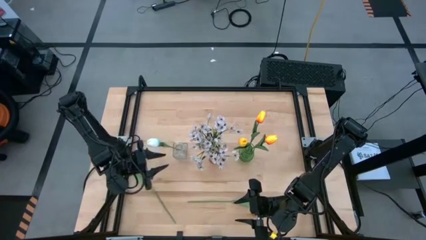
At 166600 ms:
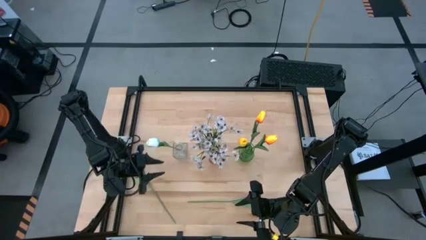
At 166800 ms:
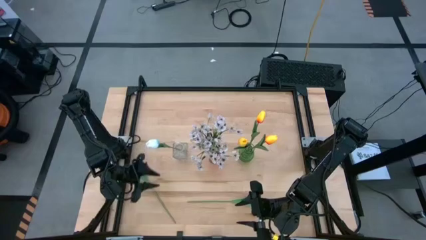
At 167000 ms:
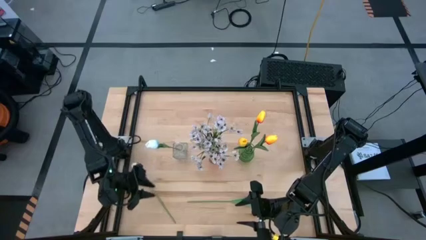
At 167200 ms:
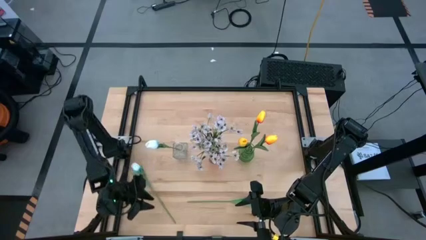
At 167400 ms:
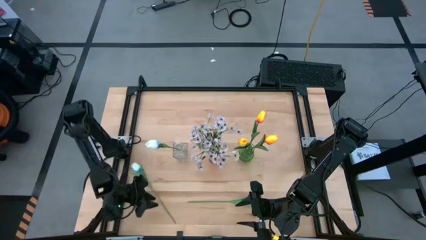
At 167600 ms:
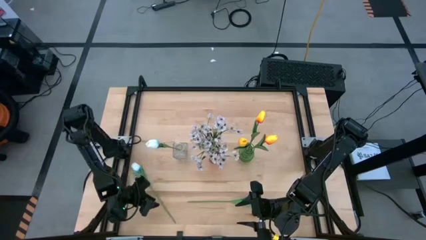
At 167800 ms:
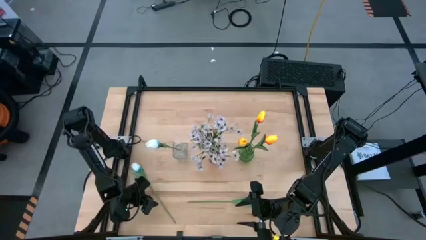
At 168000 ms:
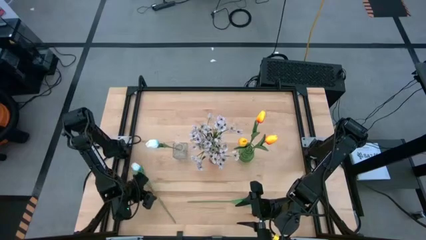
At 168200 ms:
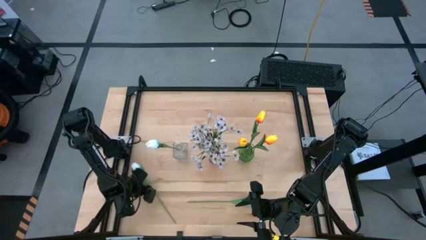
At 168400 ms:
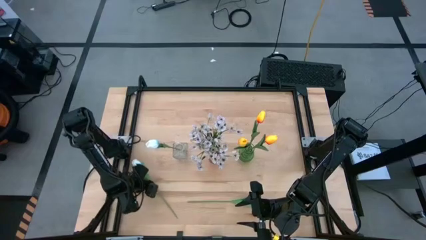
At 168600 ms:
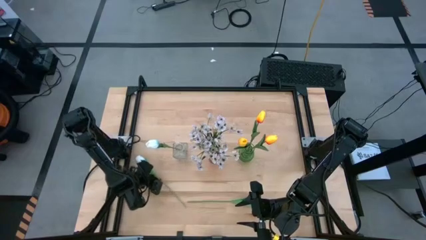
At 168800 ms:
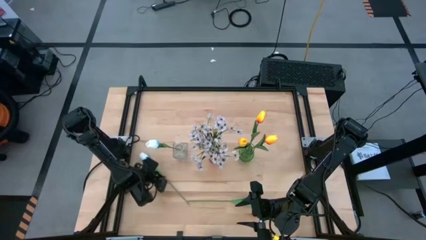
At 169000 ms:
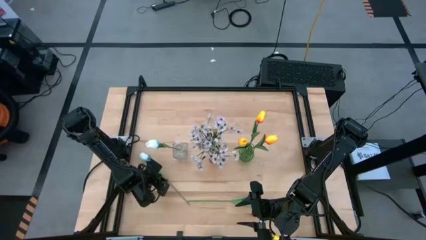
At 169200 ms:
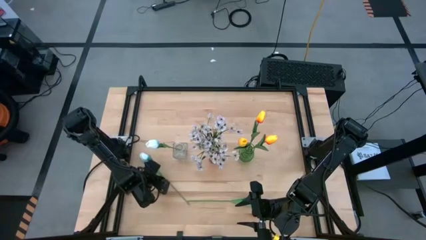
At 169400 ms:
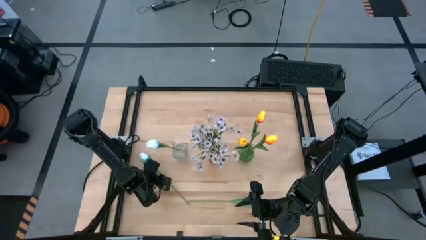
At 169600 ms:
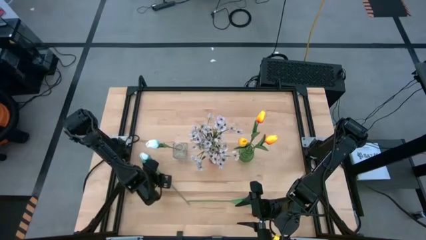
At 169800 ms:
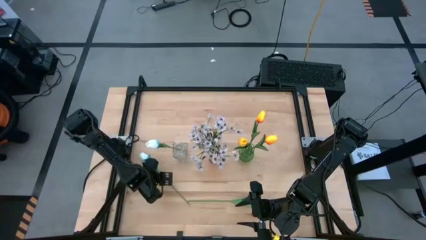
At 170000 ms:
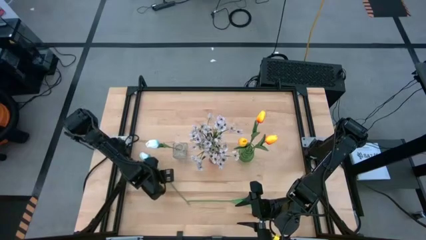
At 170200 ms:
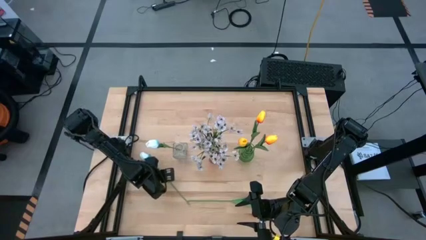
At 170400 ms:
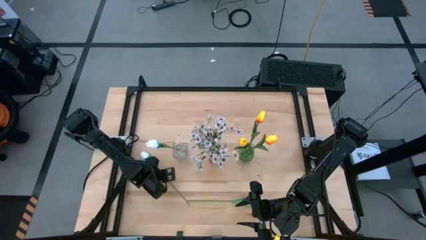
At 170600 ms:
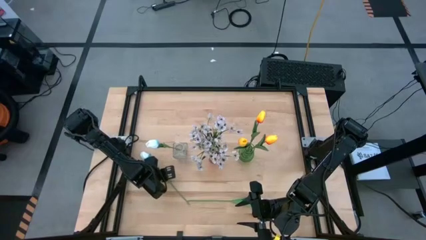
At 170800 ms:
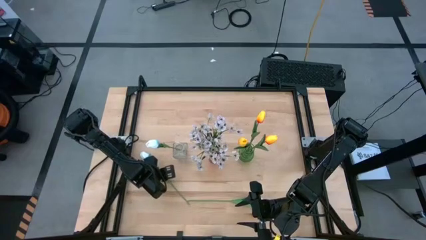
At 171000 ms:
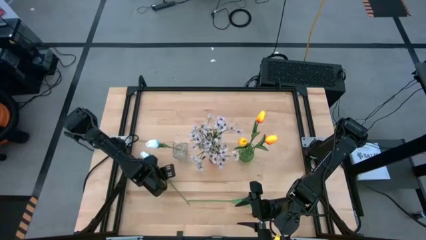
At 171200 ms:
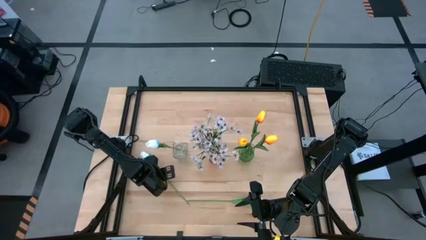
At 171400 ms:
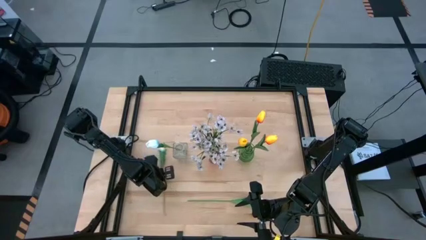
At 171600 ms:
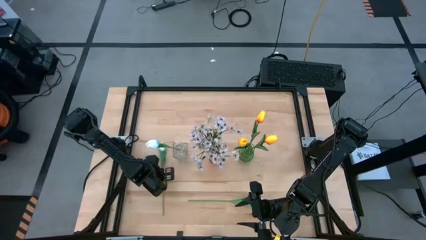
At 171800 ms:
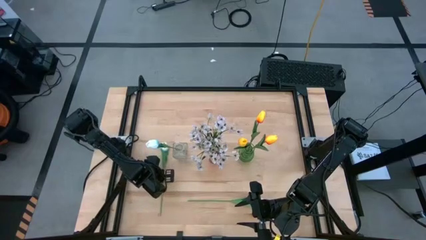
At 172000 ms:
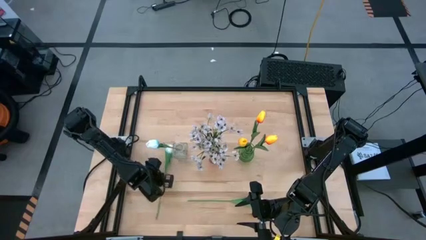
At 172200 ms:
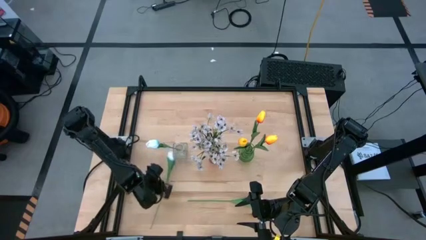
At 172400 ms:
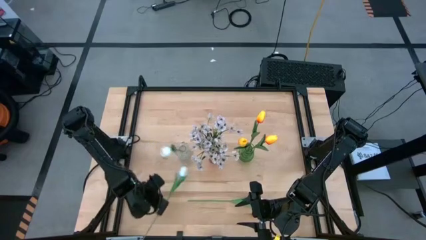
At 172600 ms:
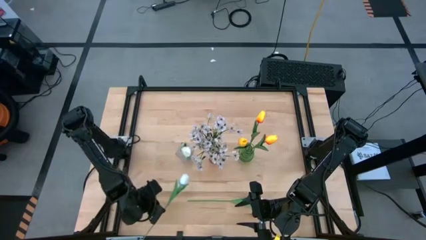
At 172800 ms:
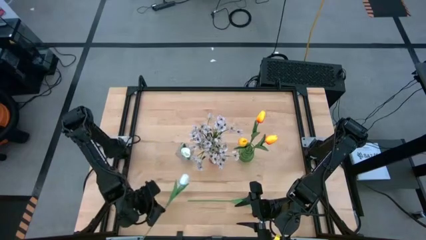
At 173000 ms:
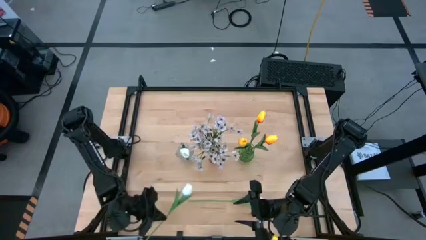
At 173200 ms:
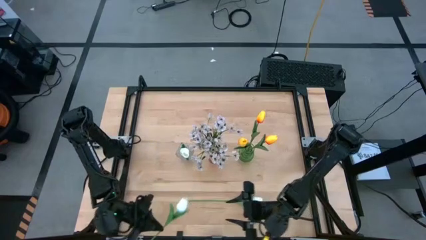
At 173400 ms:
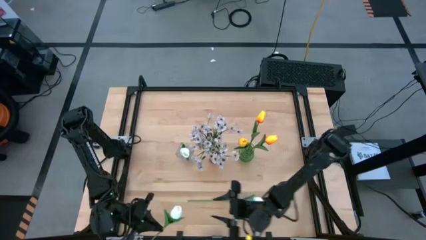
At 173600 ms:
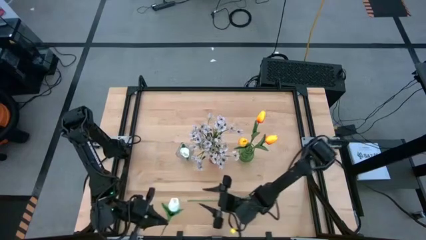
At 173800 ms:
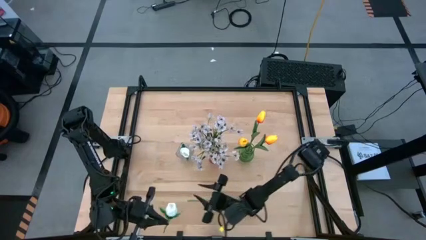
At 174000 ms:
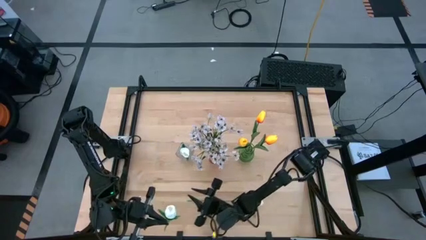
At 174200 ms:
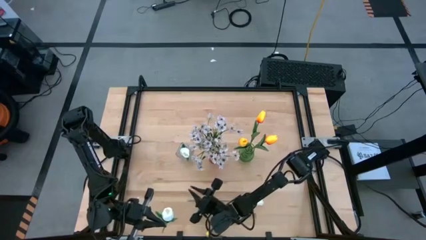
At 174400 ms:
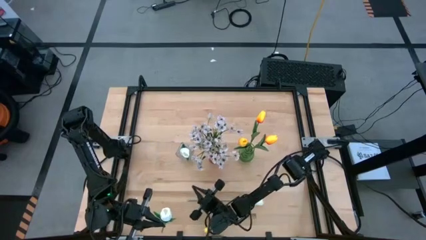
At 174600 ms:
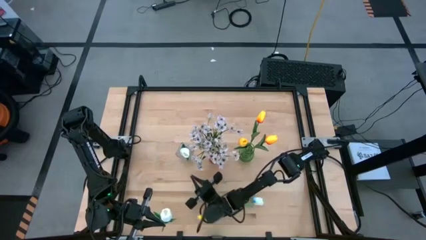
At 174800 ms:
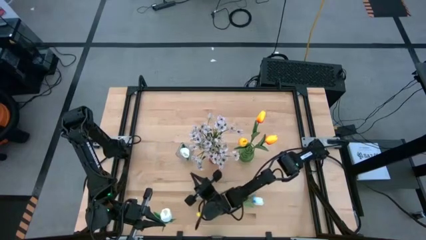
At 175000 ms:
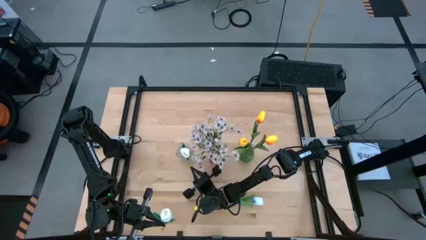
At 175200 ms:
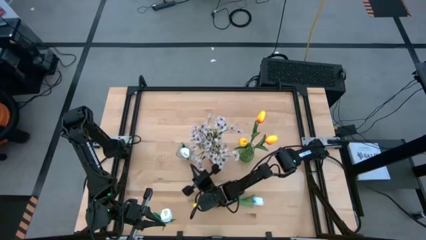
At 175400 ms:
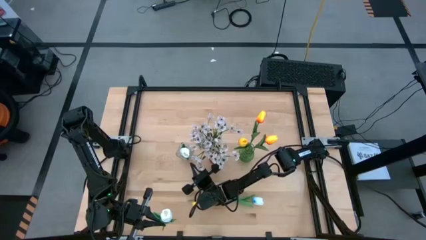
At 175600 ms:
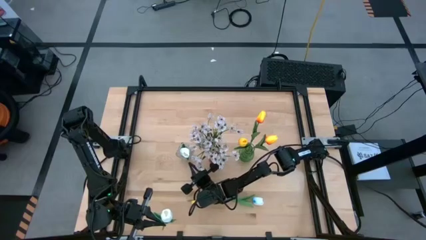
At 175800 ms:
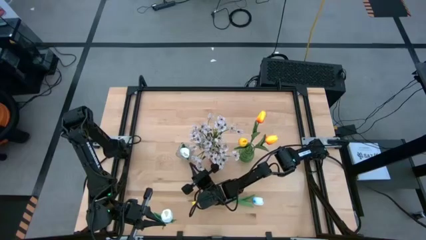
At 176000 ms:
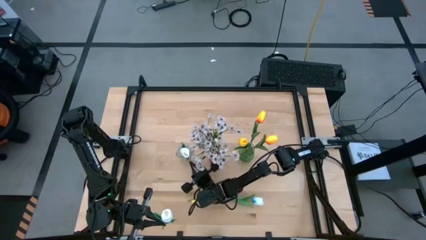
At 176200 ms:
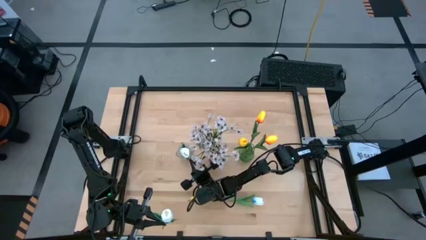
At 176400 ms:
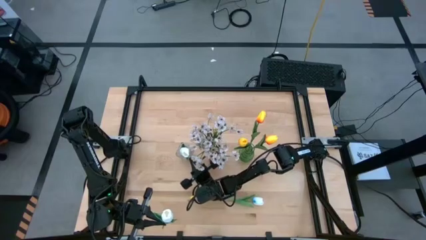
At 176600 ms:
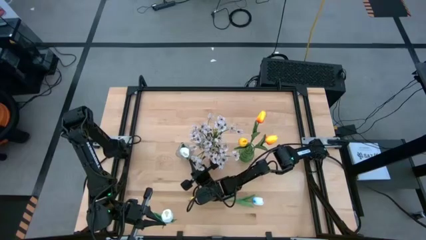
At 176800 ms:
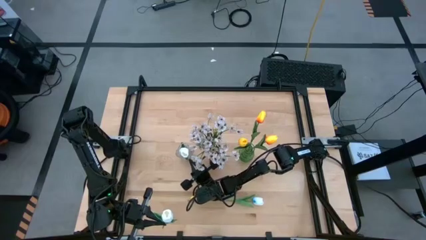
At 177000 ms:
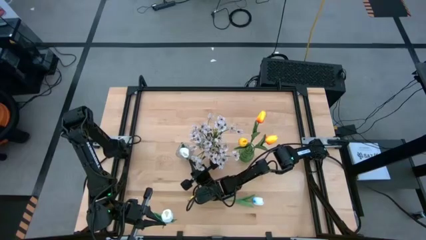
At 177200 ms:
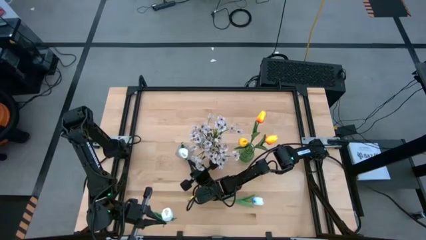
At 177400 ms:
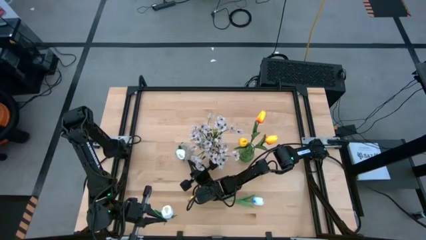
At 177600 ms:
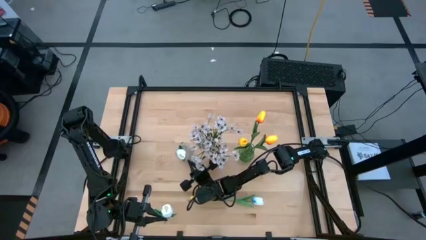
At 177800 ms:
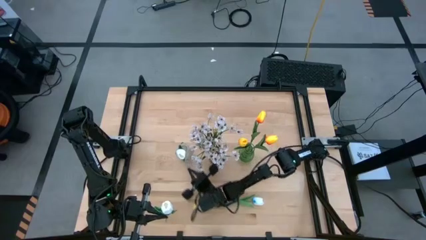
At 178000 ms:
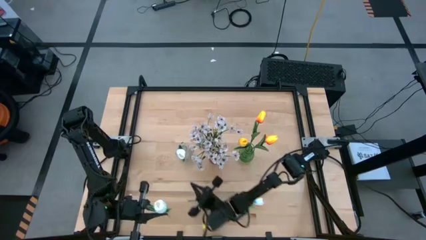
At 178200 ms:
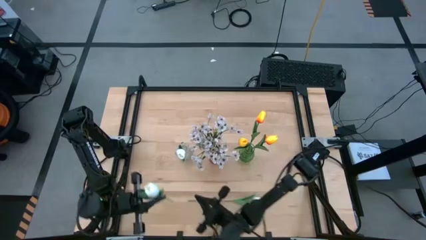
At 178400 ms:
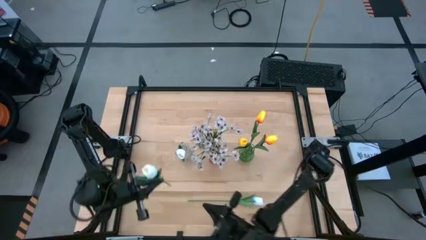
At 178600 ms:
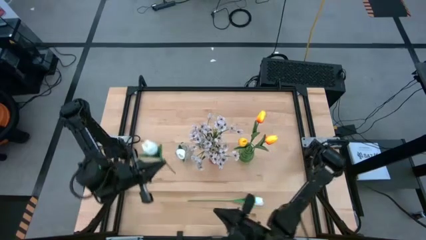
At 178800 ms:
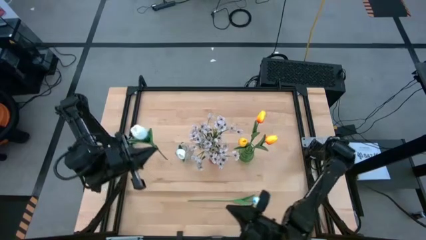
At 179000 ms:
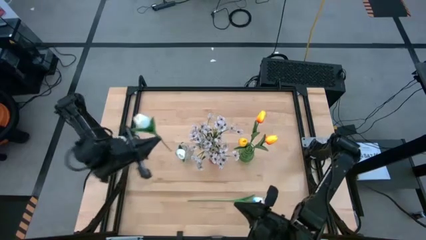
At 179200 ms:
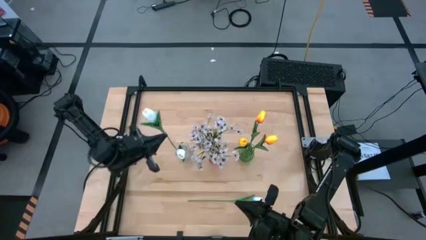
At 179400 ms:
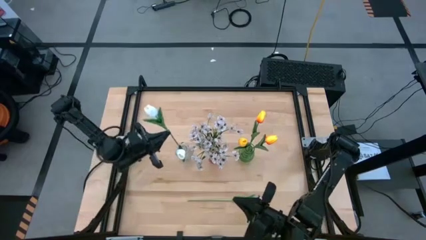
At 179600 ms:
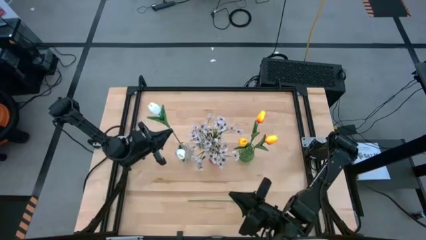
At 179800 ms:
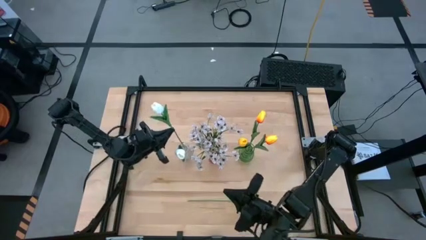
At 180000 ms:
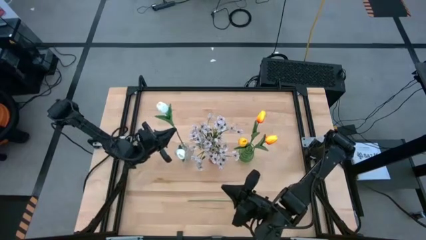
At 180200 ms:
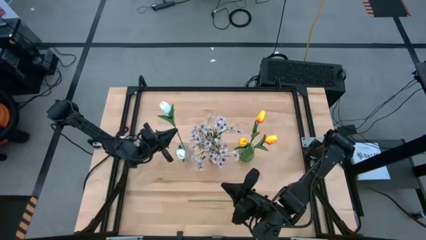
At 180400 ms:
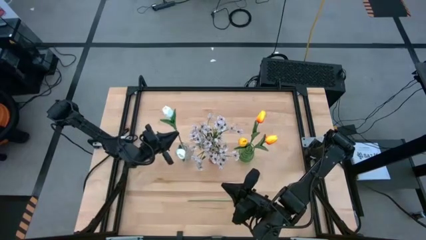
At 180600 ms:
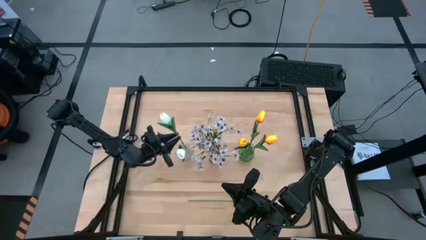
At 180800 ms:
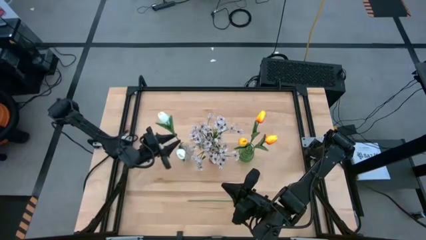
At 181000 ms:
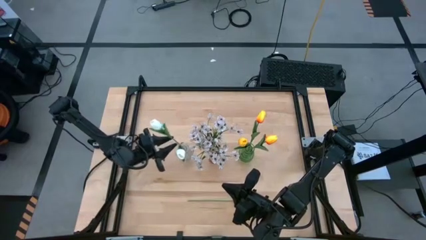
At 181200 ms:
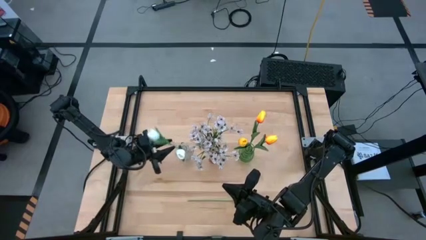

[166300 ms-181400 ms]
Task: Sort flowers into vase by color
Put the left white tulip into the transparent vase

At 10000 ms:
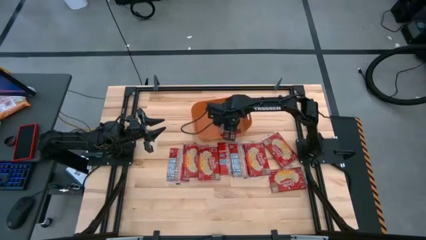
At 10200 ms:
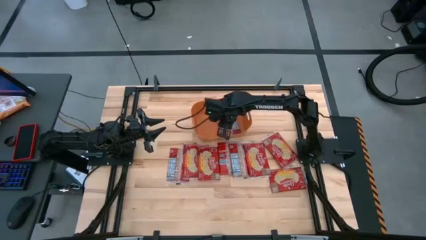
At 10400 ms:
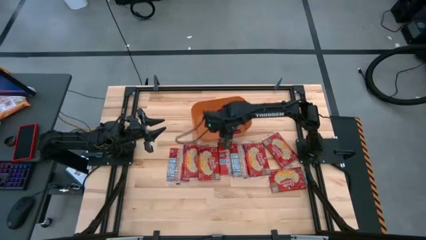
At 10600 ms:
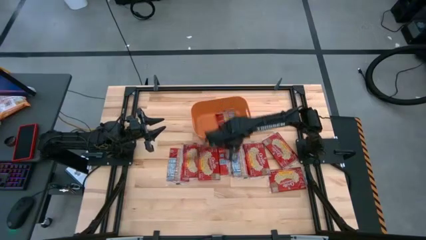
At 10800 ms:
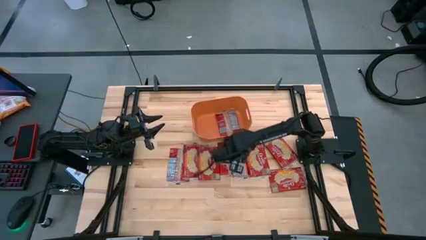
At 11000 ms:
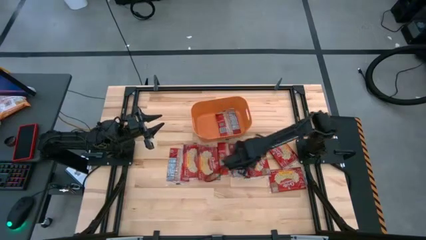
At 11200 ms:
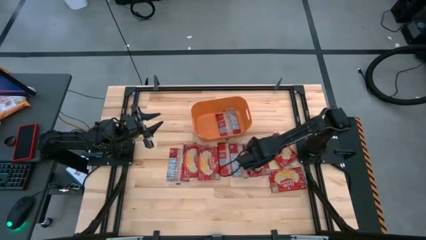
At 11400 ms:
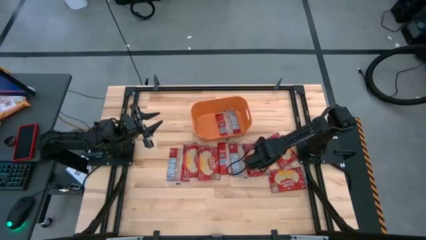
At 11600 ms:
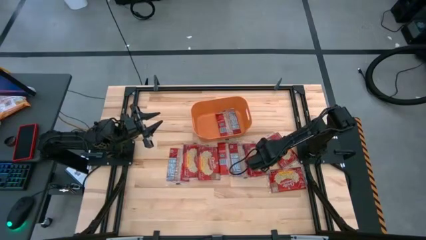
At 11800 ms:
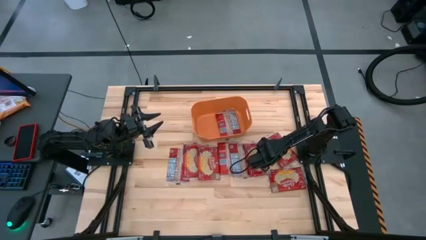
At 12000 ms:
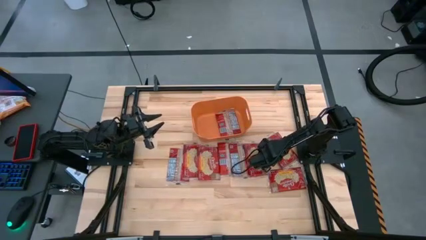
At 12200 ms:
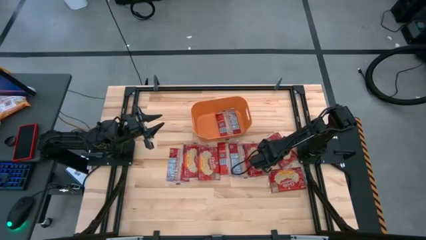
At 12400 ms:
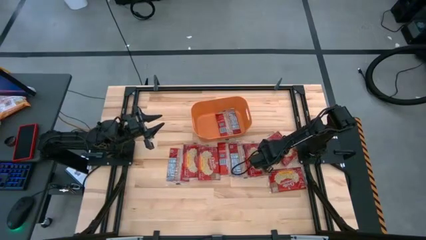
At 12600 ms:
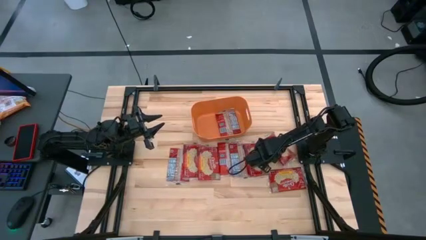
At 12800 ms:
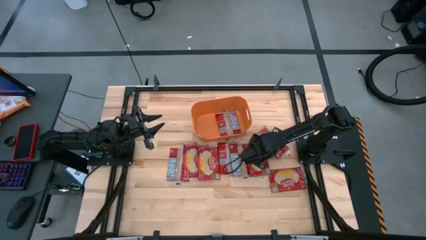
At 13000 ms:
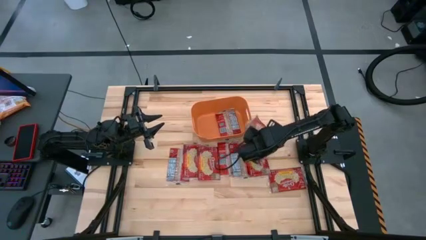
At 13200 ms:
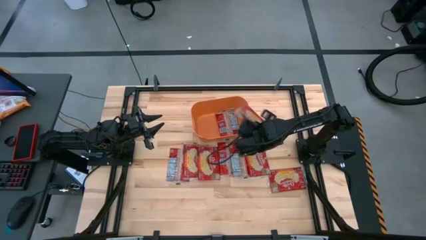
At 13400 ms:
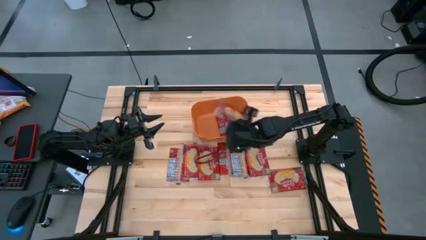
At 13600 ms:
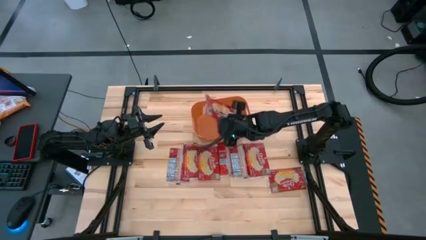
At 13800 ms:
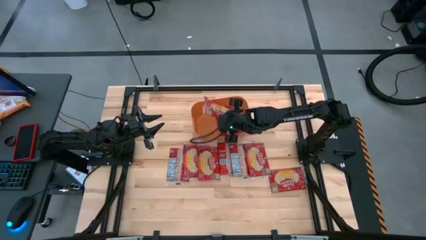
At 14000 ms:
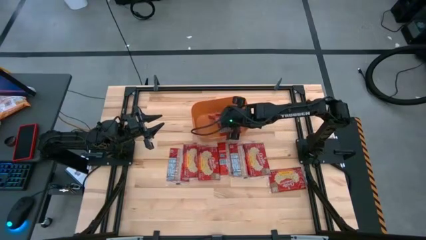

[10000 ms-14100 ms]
Task: Sort popcorn bags into baskets
Put the red popcorn bag into the orange bin
